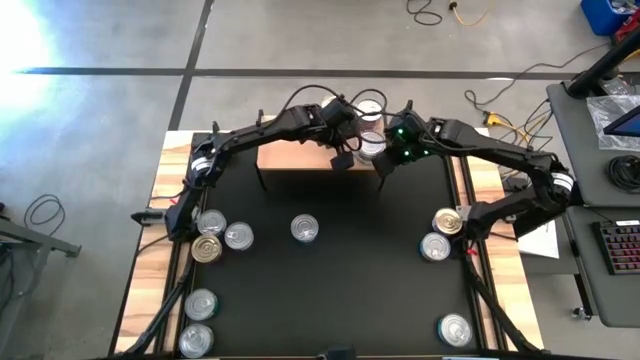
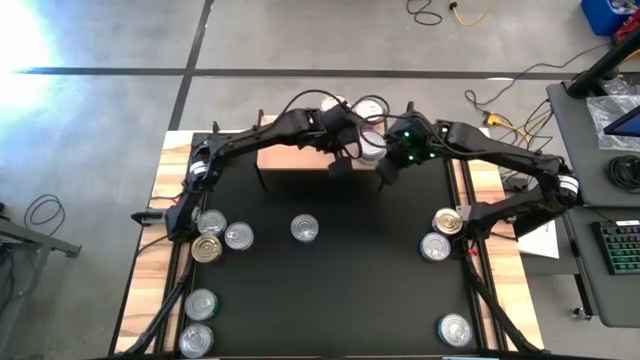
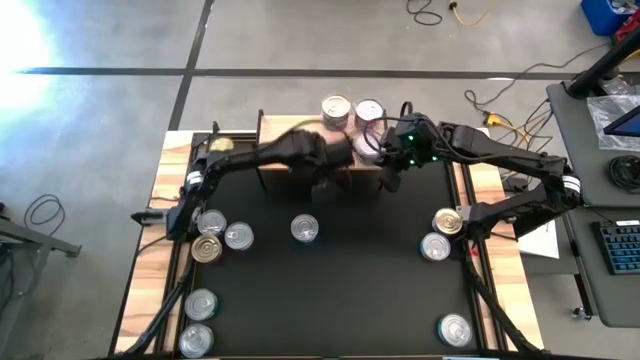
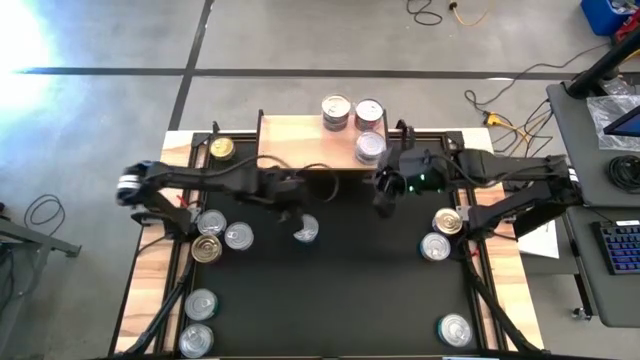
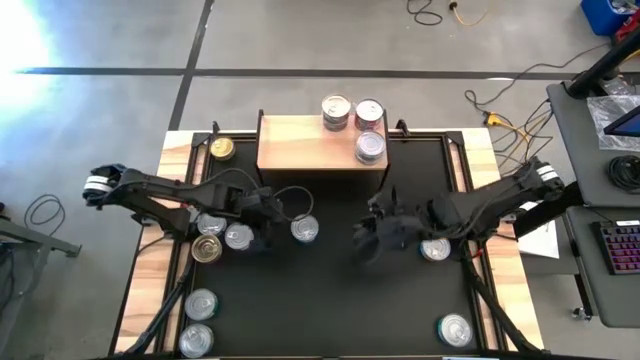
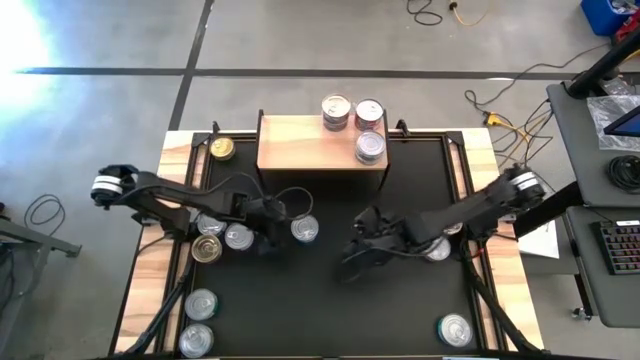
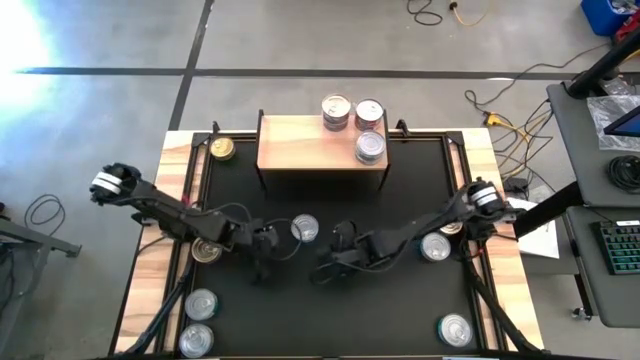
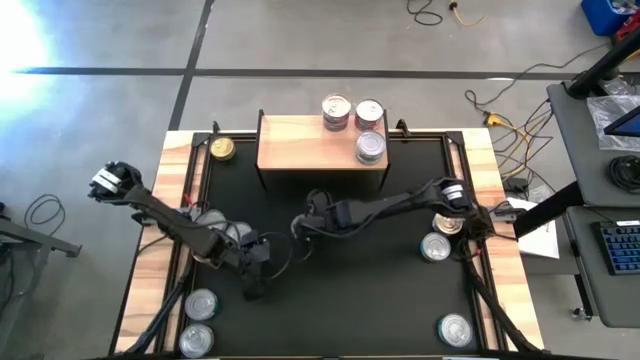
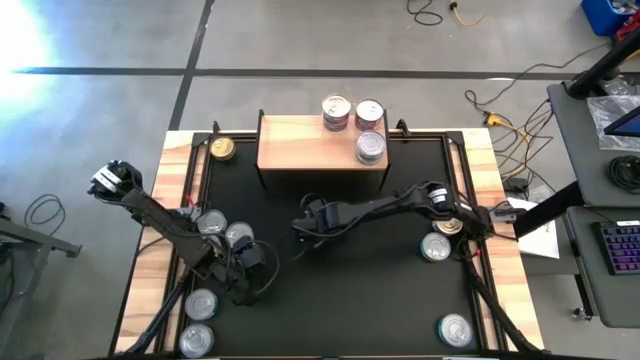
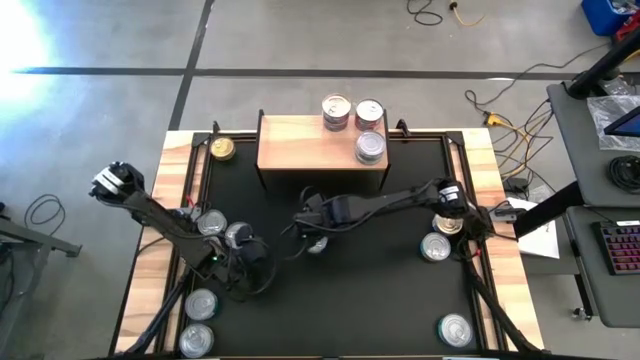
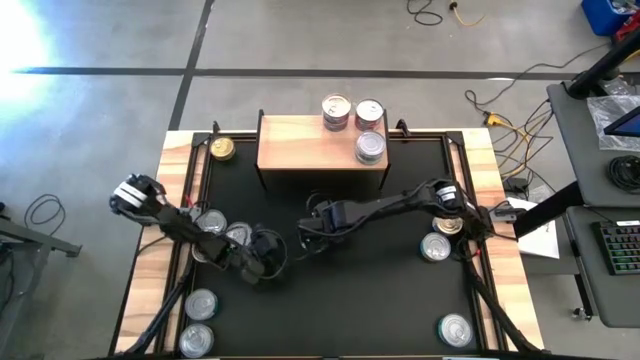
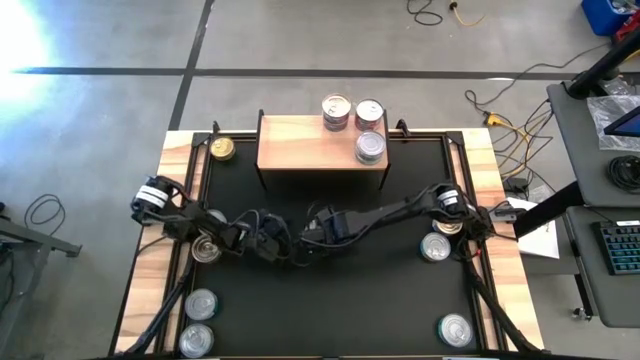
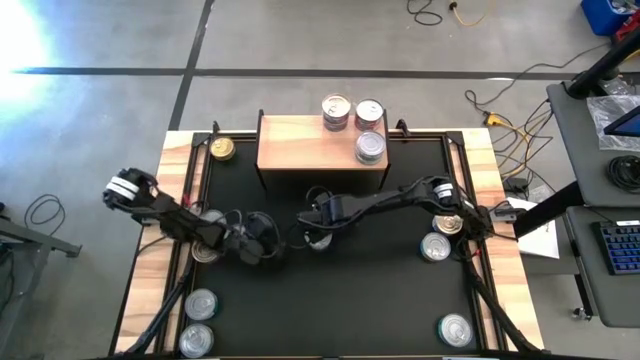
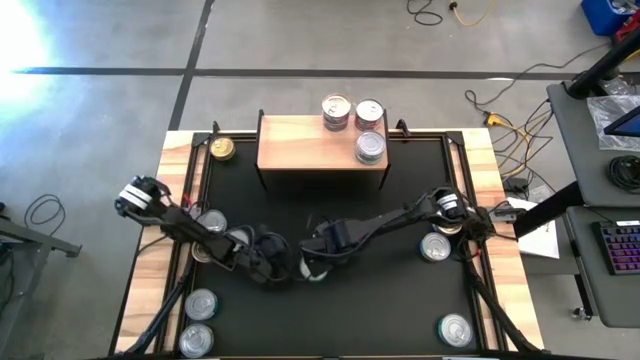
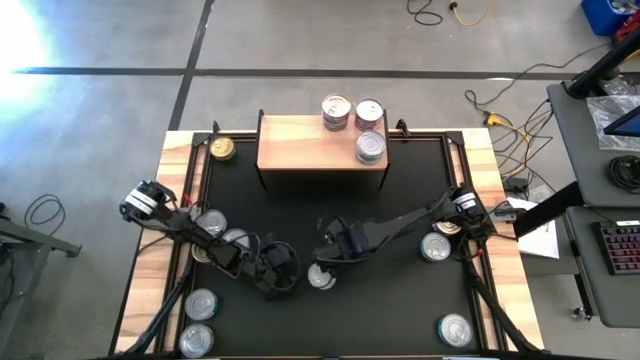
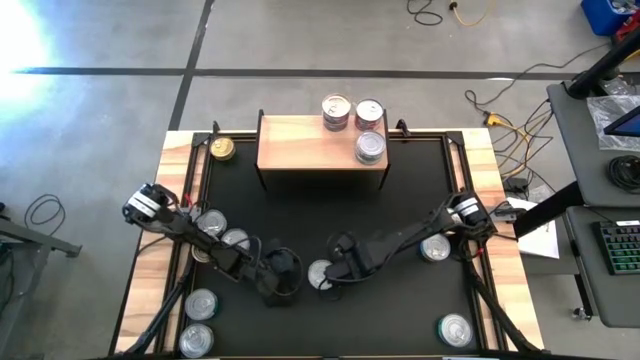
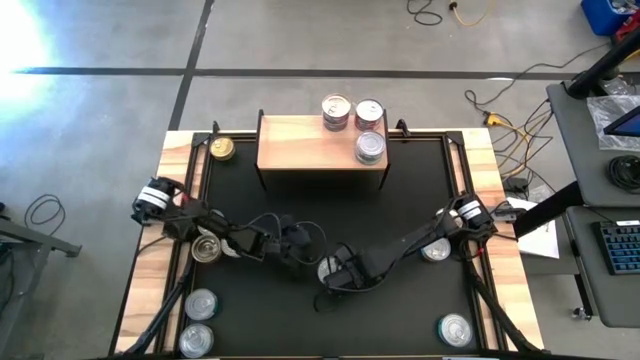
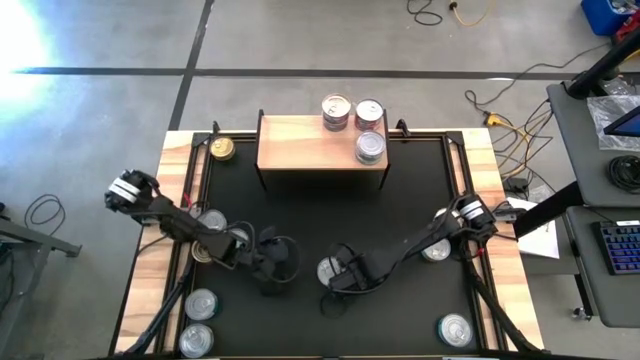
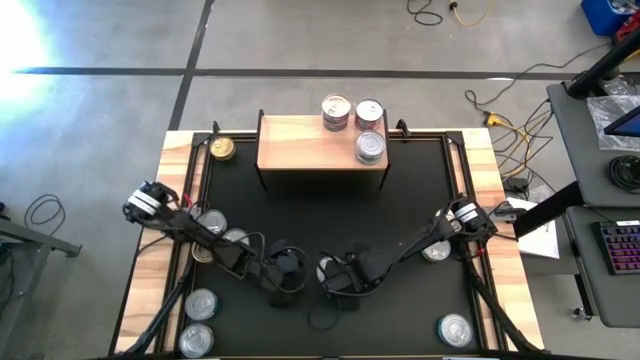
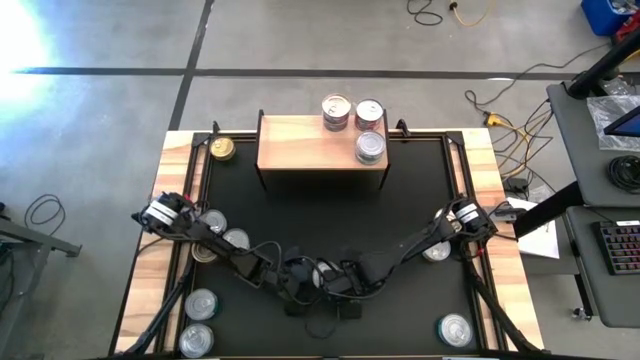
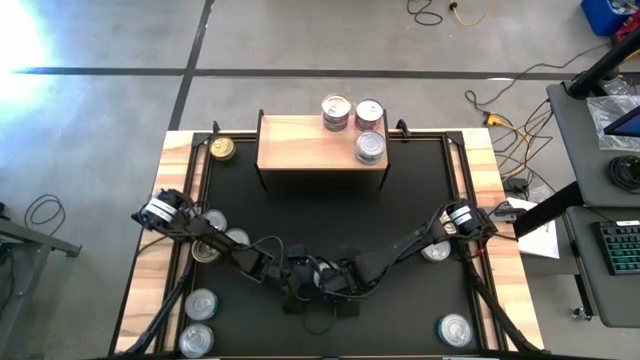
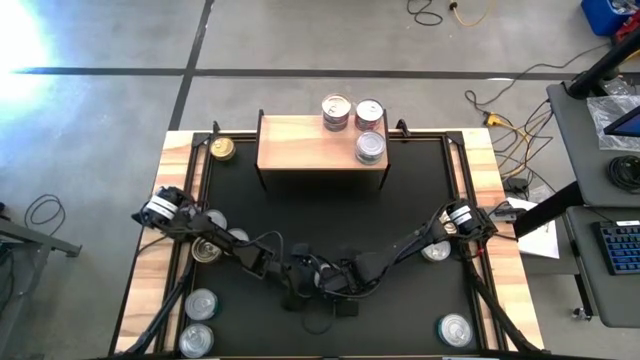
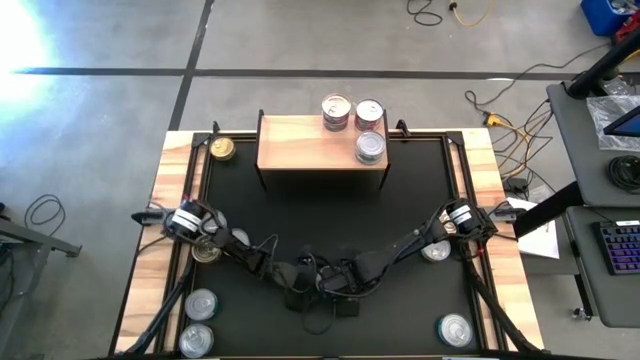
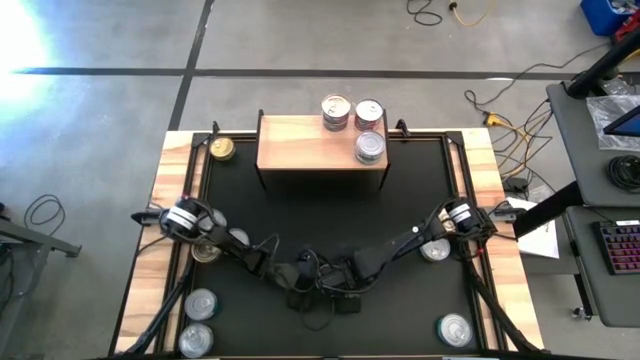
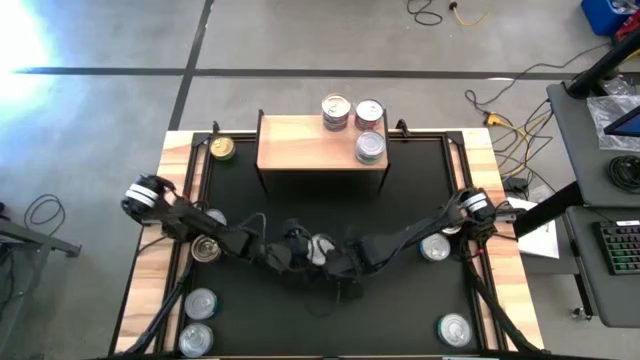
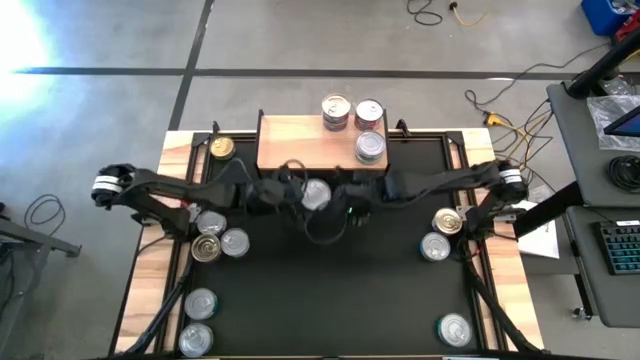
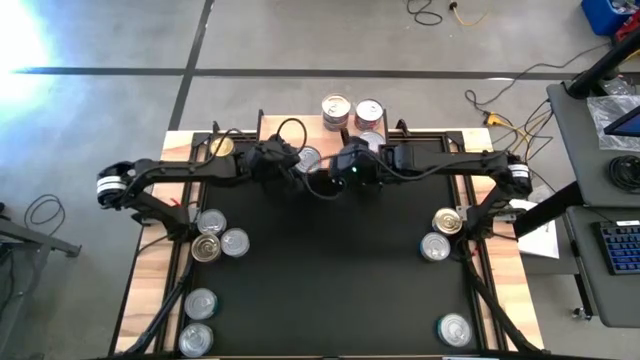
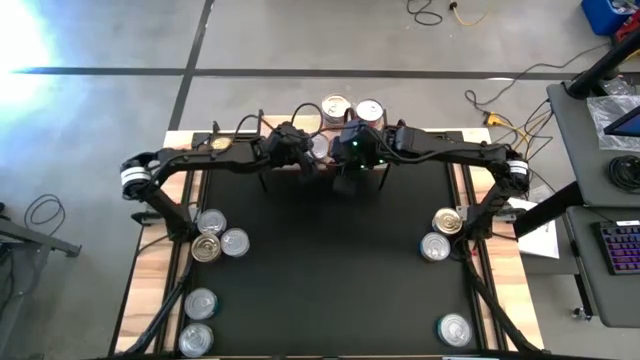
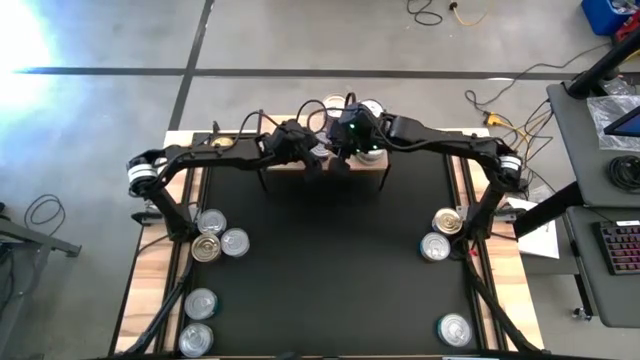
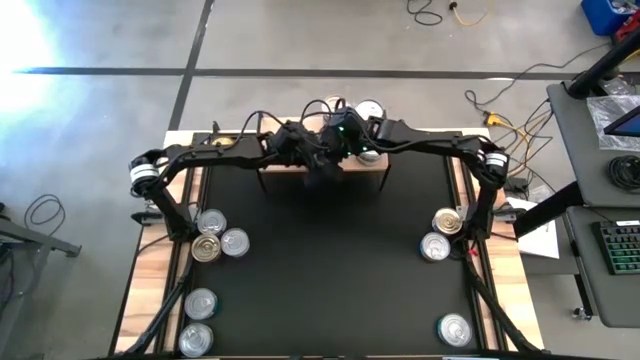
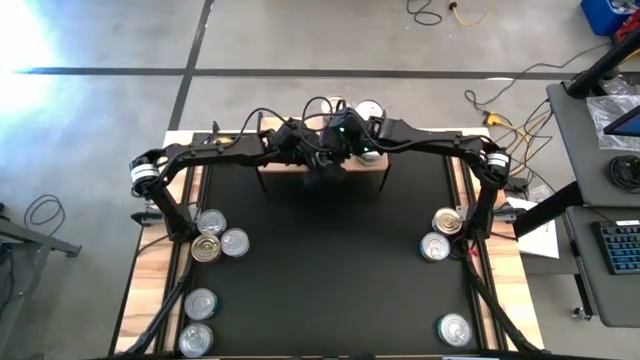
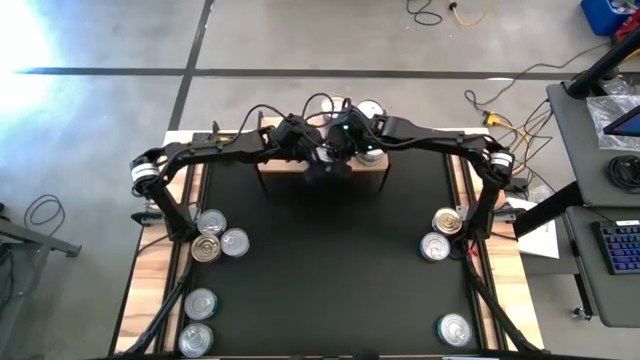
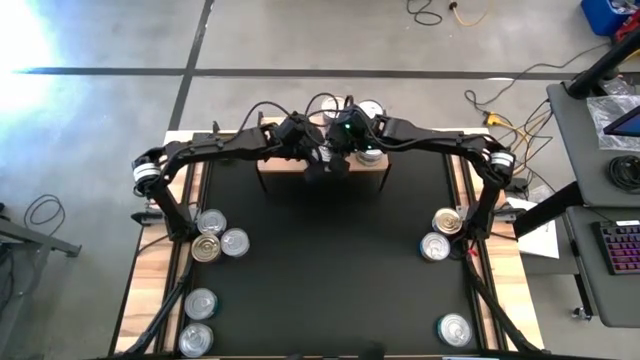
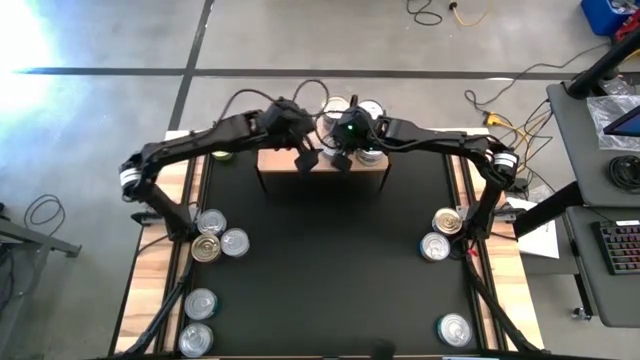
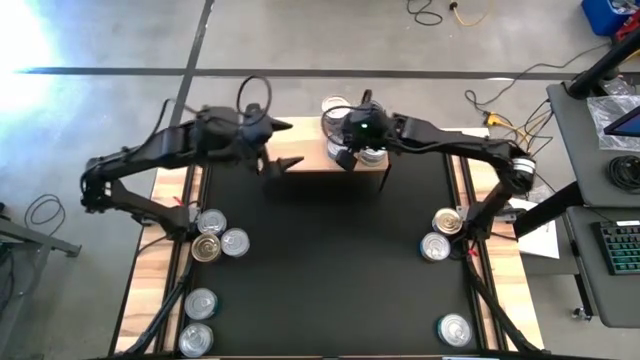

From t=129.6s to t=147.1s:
Task: Stack canned seafood by type on shelf
Put the yellow-blue tuna can on the shelf

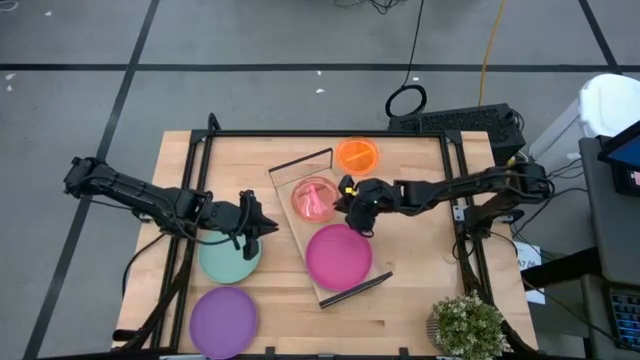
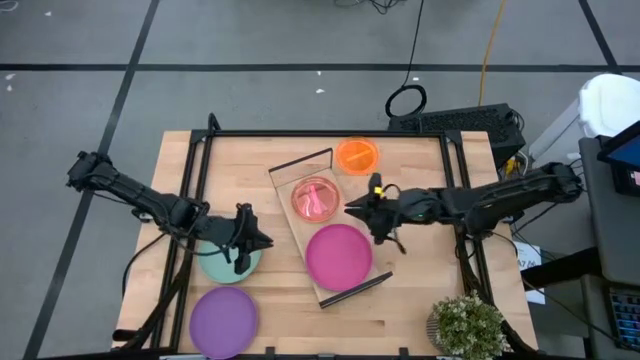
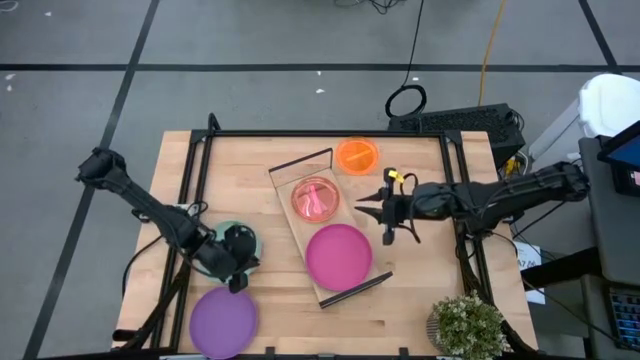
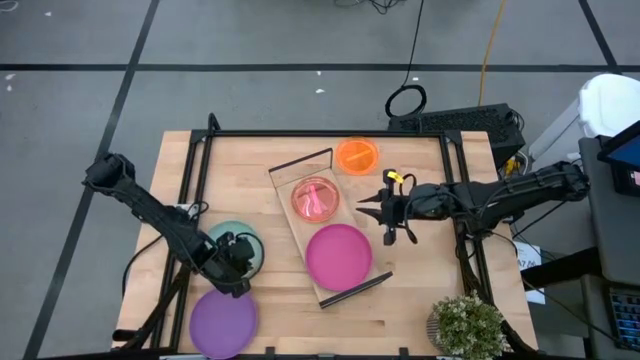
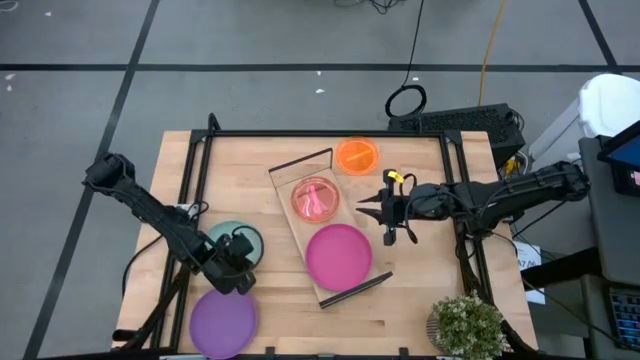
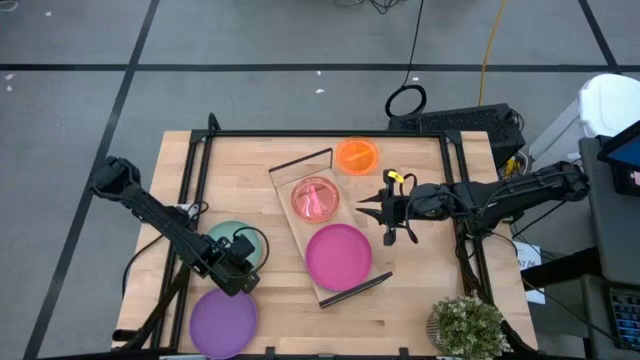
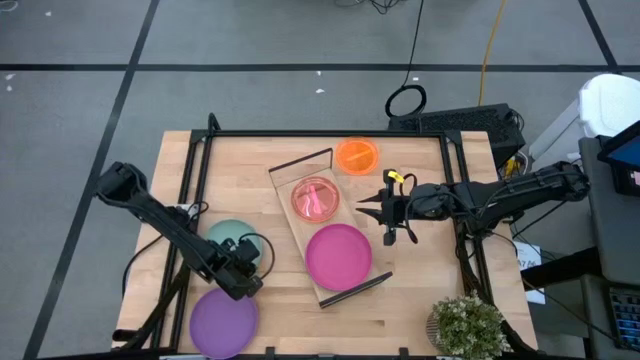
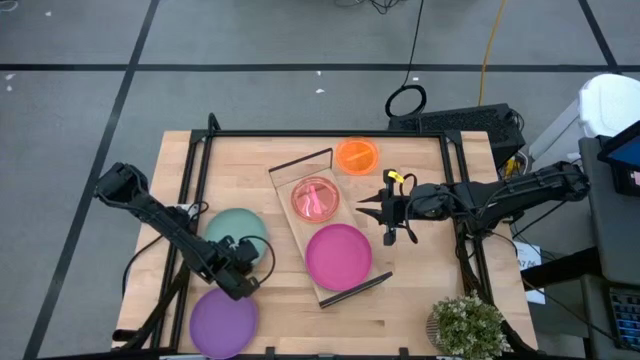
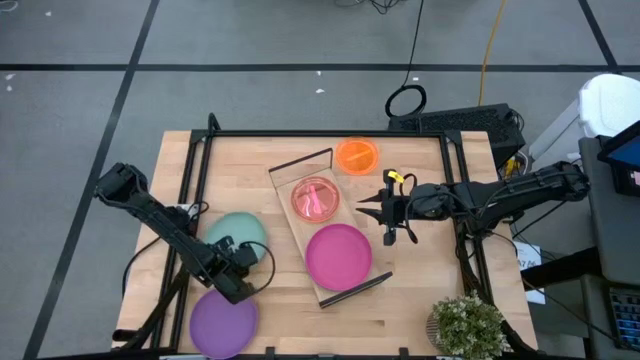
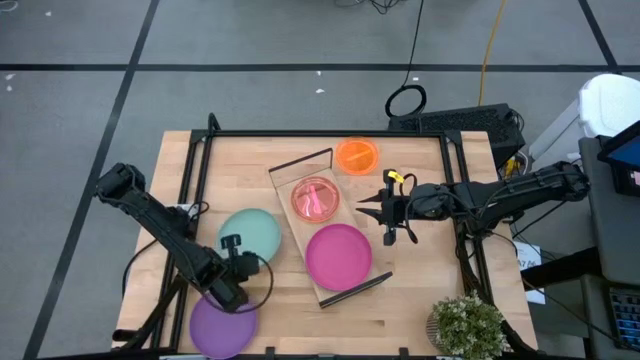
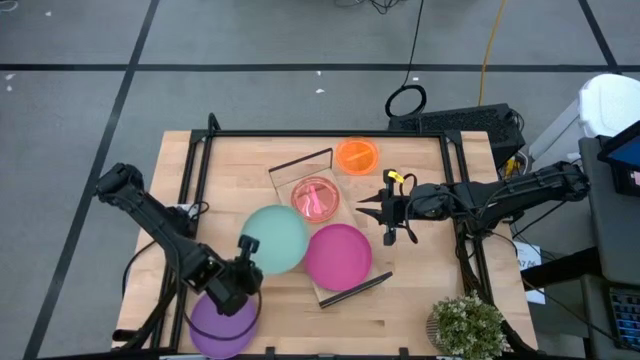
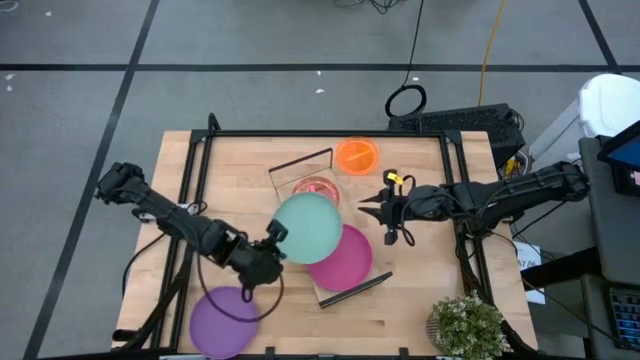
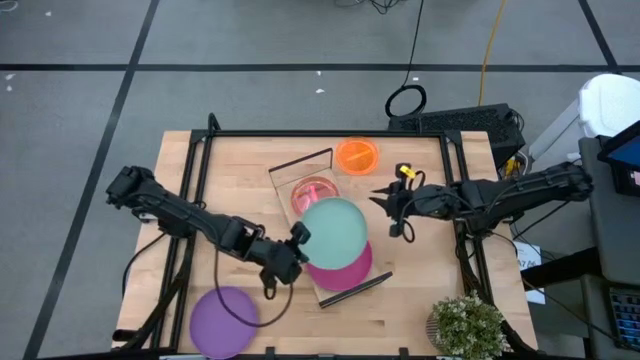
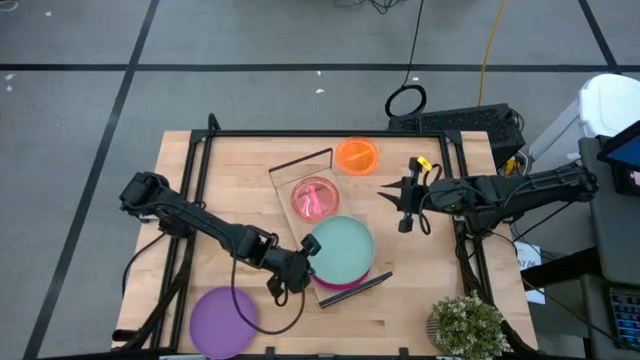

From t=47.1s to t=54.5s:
Task: Place and stack plates onto a shelf
Stack the gray plate on the pink plate on the shelf
